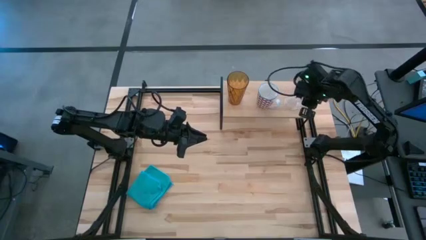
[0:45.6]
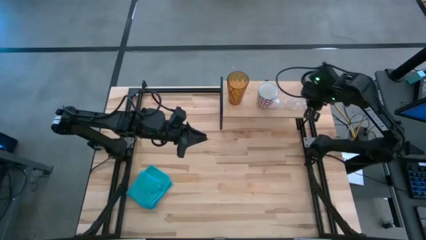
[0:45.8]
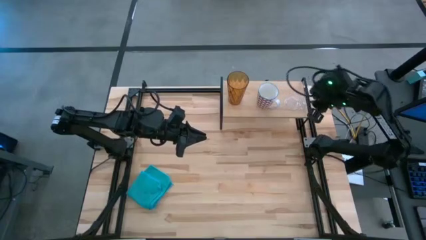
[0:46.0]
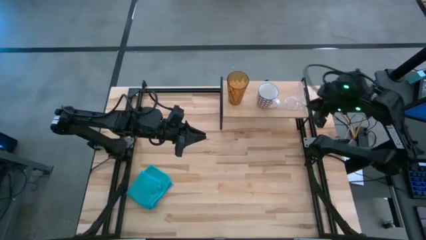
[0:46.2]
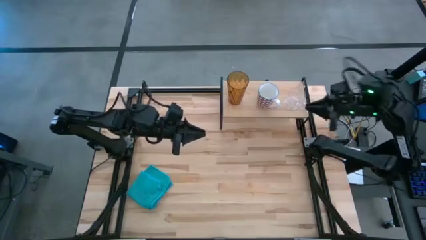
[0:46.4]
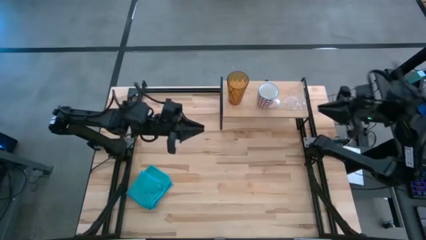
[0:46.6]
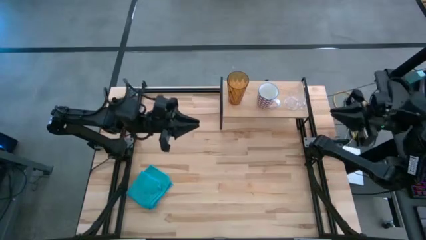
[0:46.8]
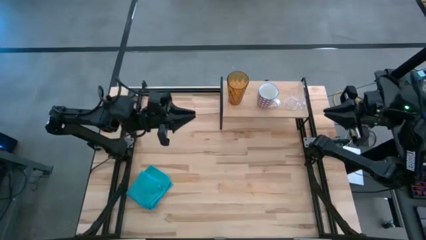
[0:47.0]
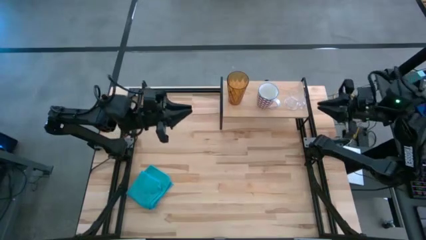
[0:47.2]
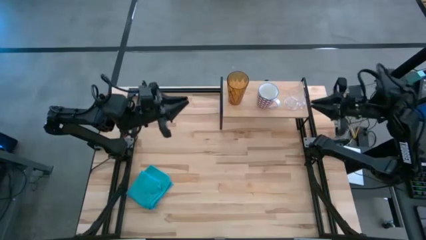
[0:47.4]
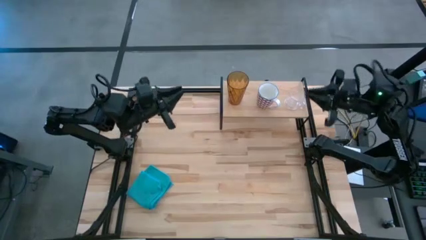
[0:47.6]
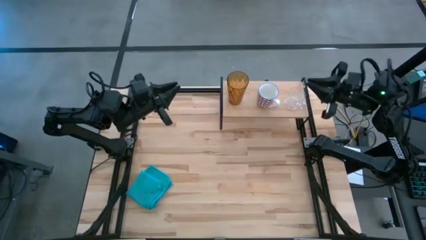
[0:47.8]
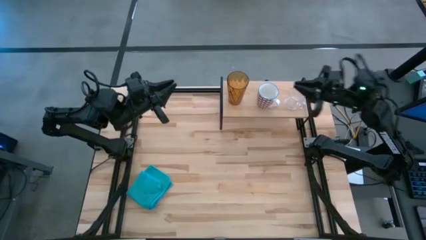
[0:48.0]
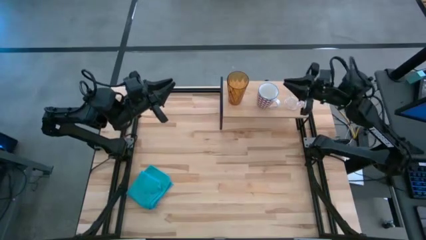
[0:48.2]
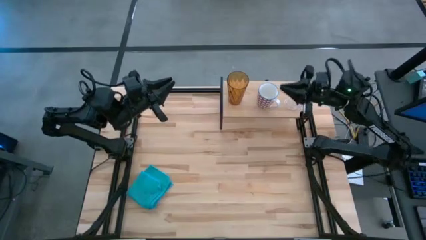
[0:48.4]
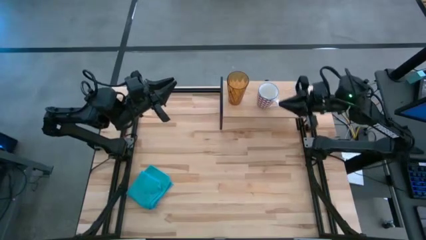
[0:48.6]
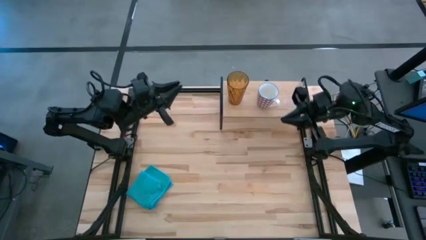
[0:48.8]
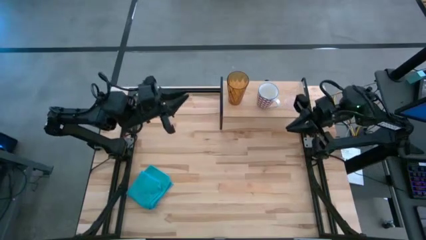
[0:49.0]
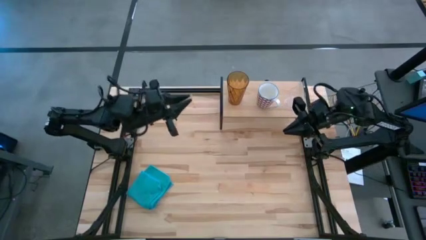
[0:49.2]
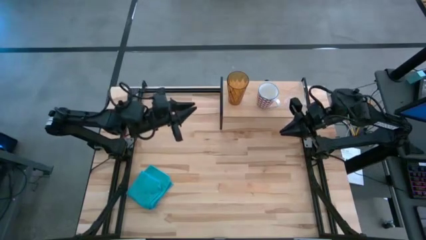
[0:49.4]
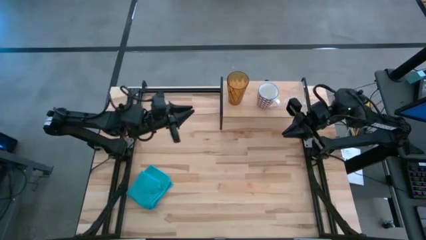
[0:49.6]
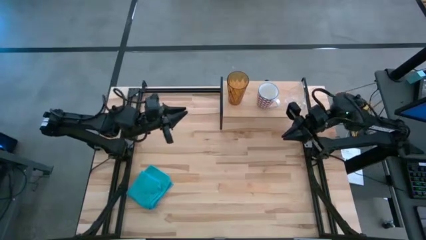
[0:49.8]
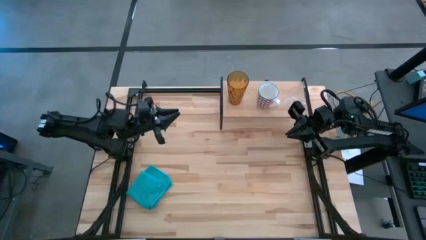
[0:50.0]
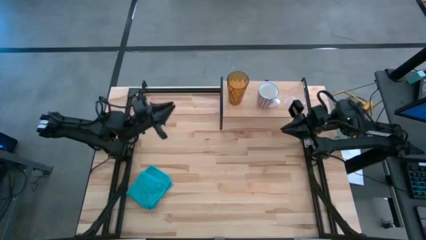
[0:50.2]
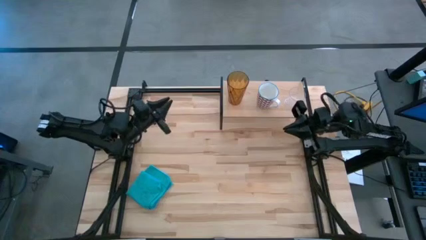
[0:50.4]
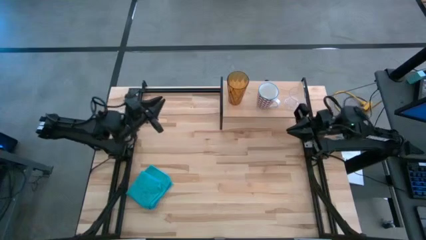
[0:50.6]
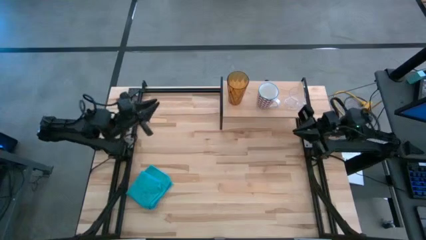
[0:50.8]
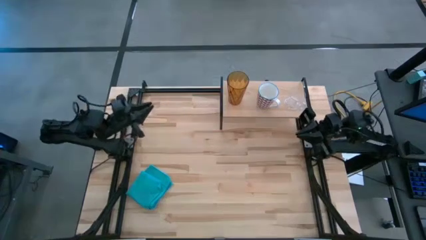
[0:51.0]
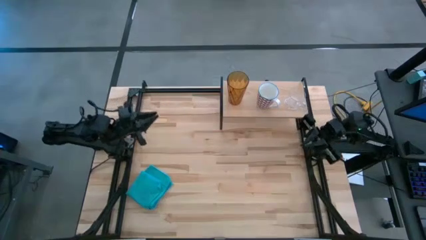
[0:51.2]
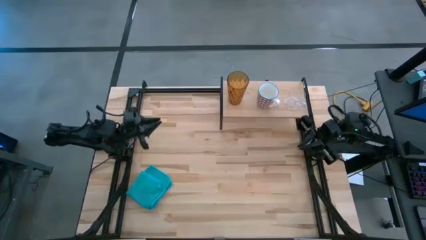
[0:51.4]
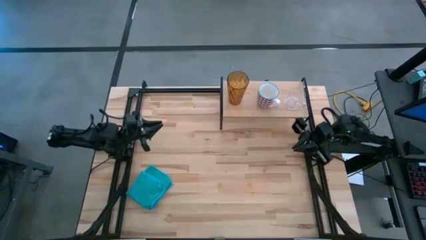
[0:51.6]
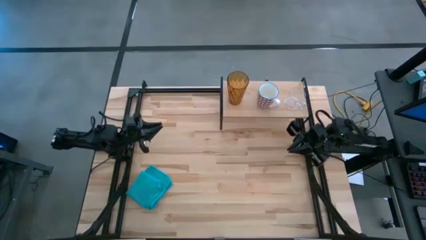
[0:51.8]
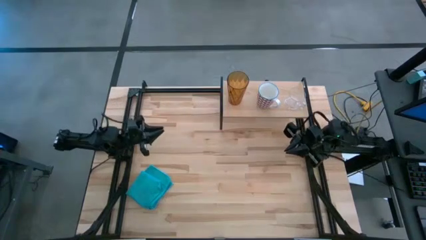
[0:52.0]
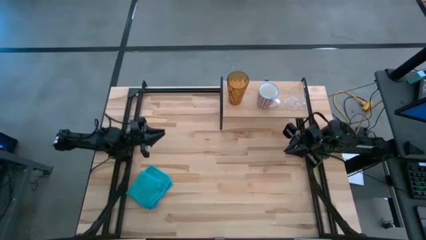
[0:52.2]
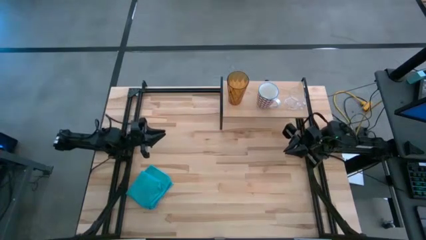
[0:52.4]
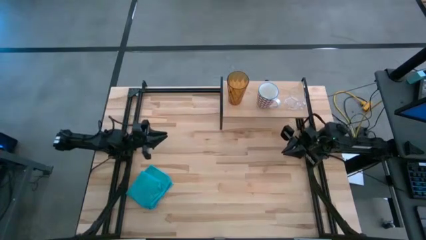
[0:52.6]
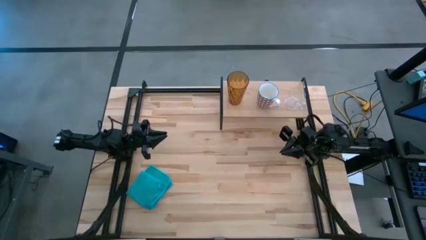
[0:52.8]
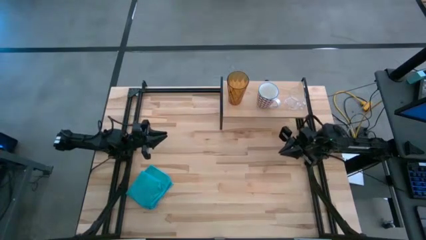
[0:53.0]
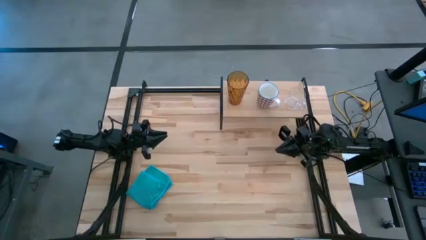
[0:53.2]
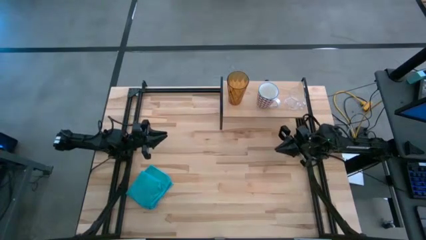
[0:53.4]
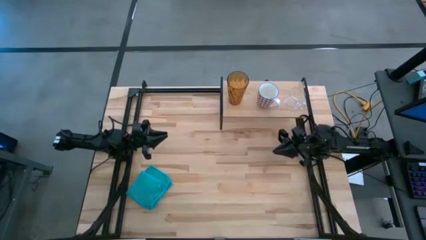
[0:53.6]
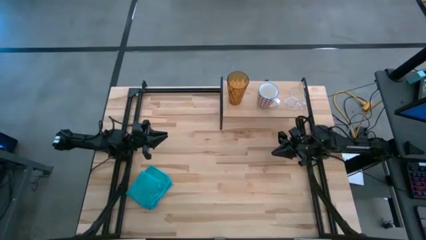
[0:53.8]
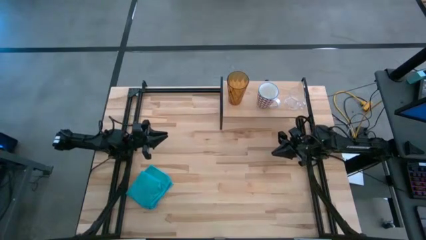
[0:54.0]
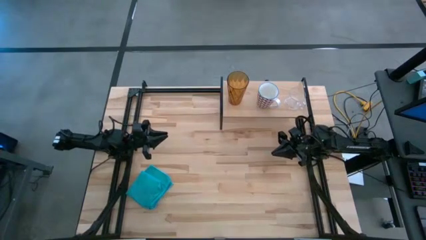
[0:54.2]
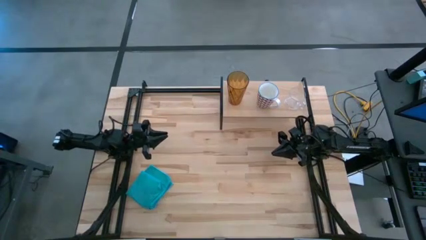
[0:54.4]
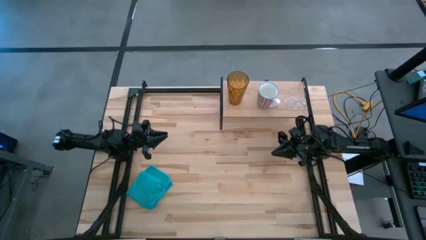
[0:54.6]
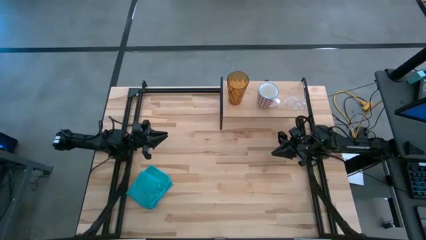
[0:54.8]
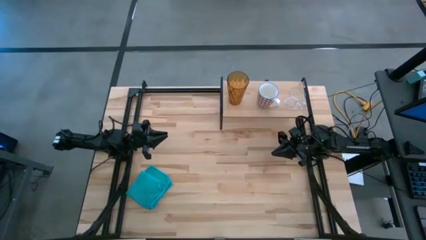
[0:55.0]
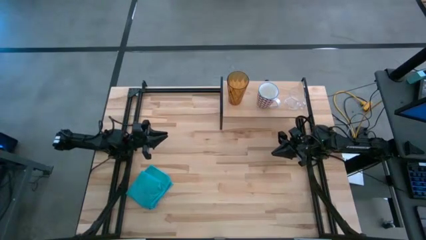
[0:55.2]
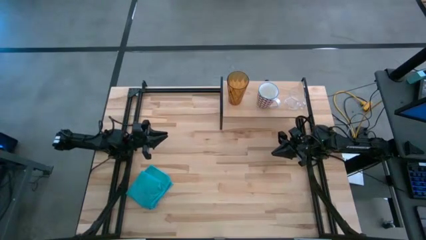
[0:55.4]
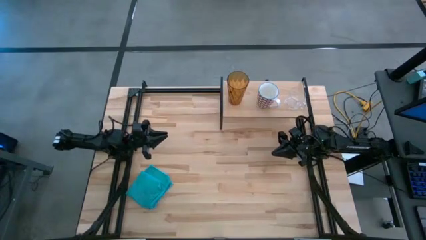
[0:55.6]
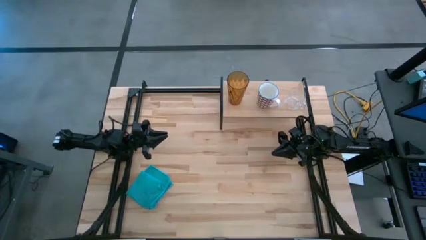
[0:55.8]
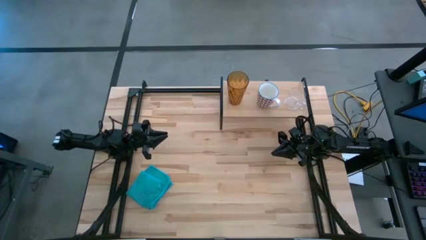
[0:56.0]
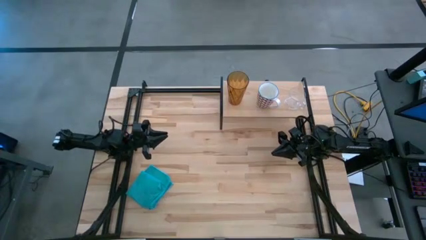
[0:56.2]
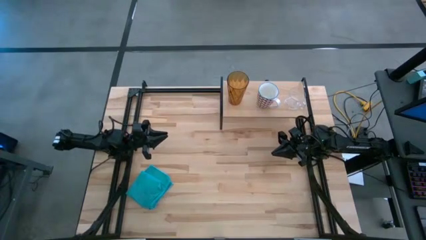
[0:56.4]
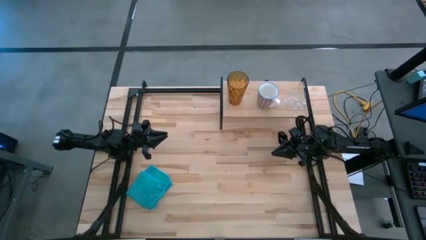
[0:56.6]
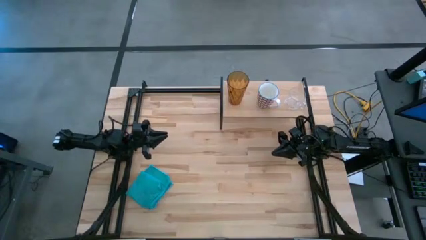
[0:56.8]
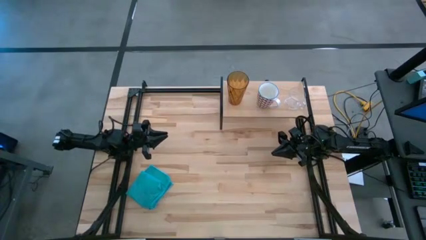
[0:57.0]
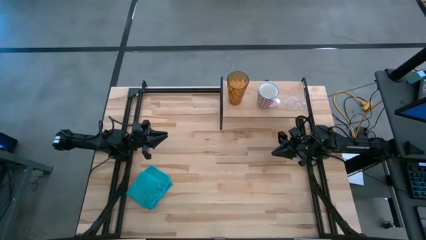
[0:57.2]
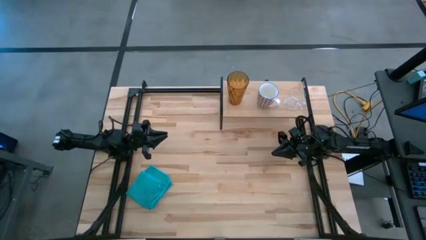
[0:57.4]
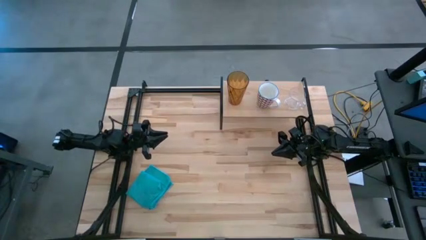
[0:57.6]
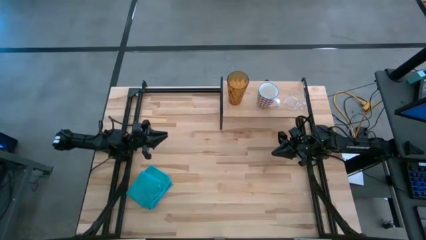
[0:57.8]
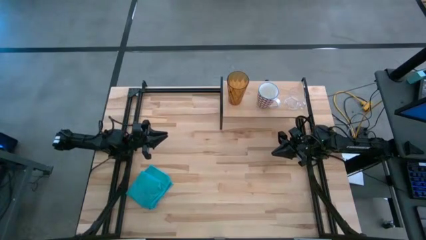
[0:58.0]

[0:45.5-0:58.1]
Task: Stack small to large cups/mugs on shelf
Return to Home Position
